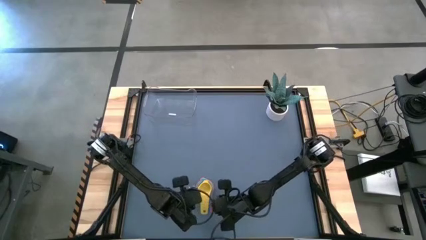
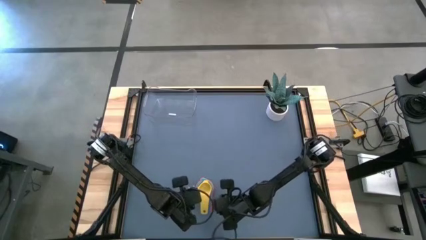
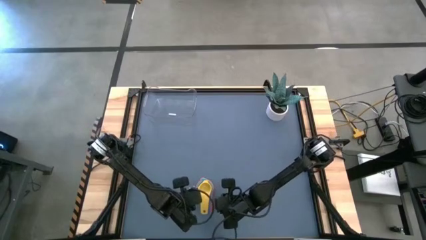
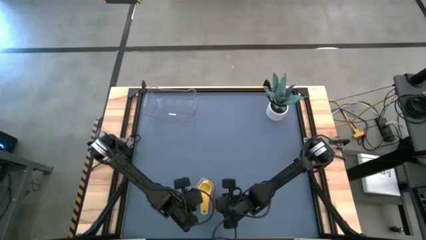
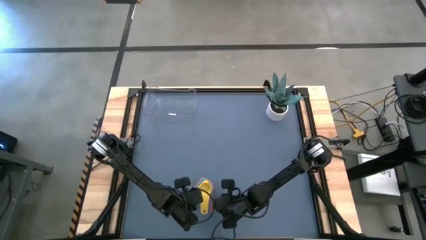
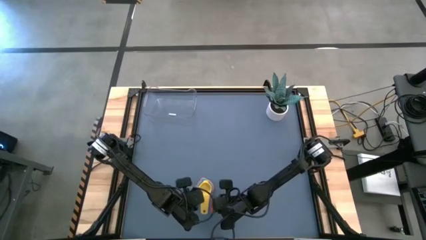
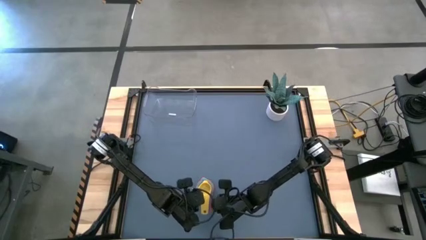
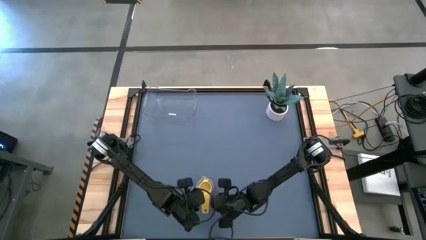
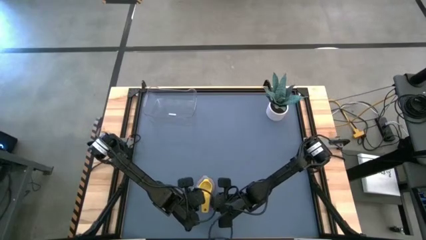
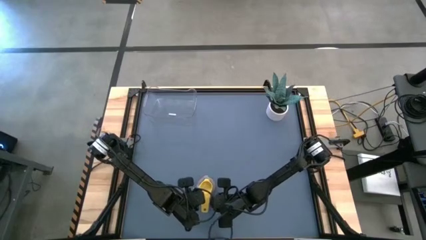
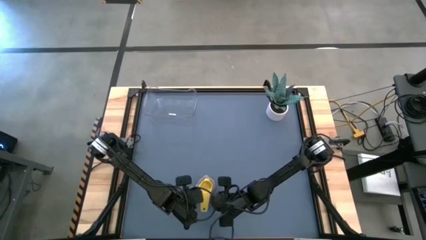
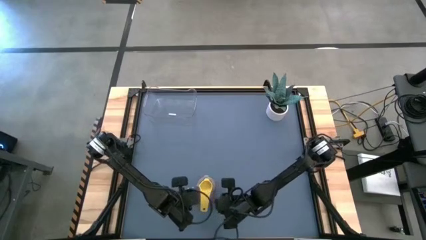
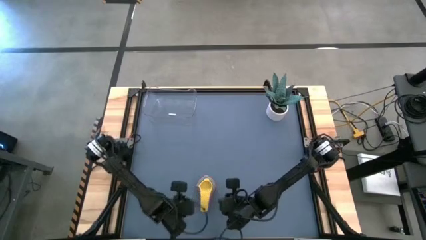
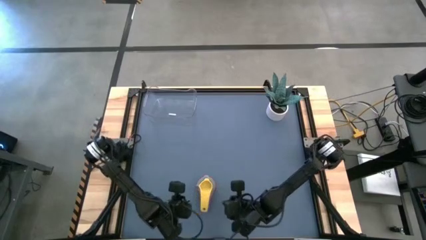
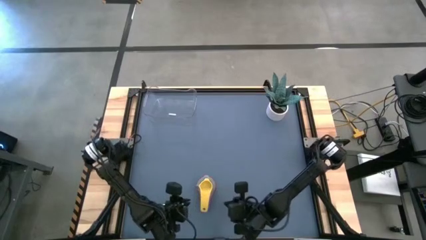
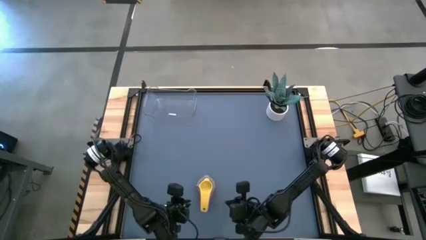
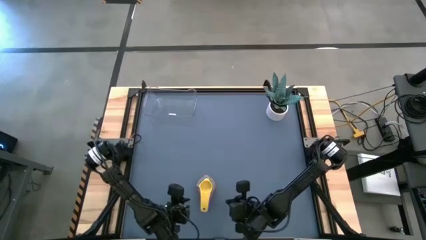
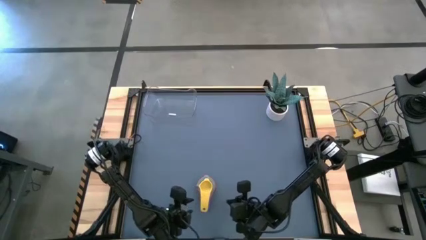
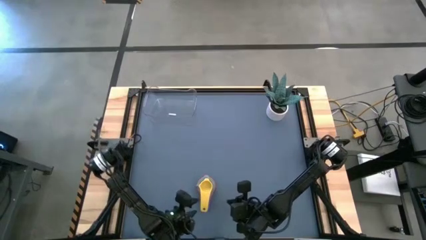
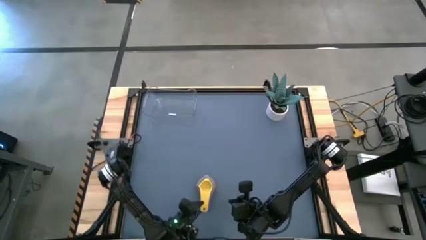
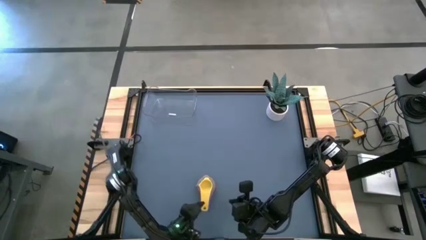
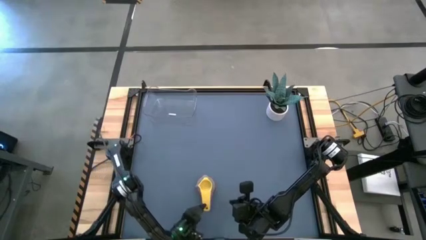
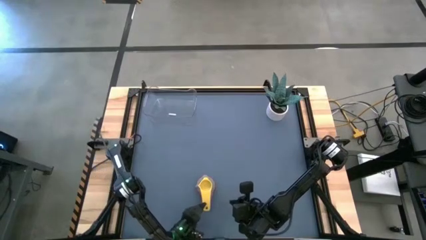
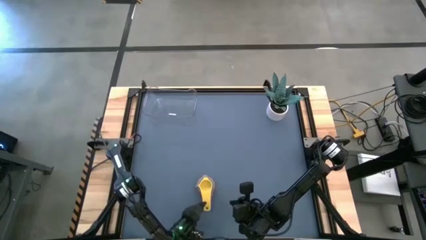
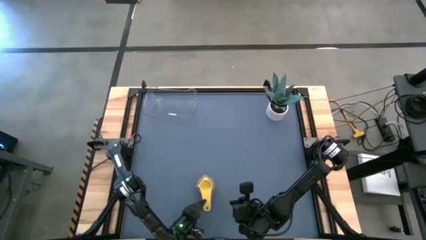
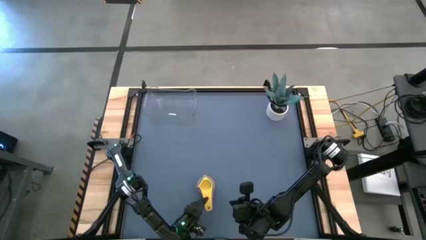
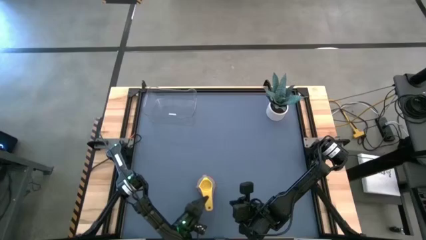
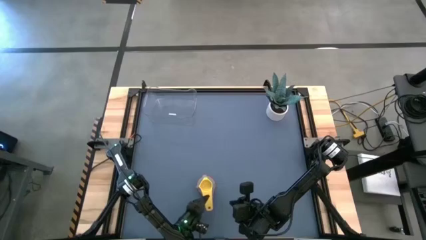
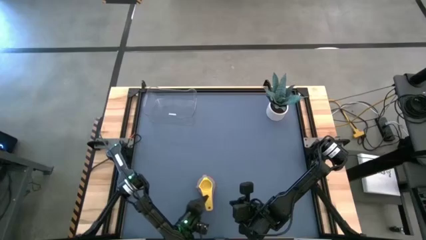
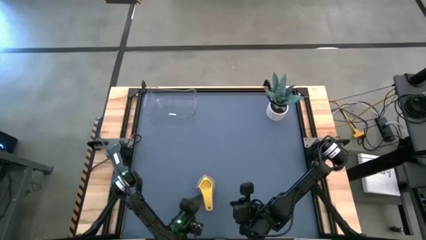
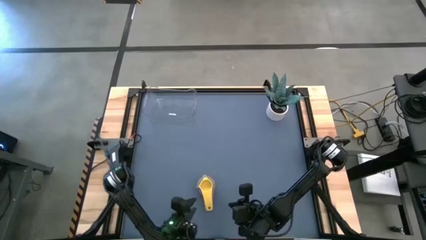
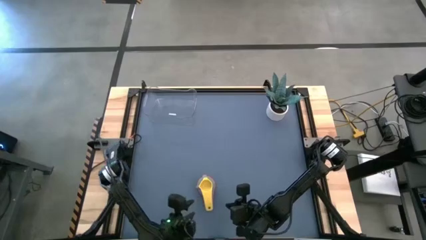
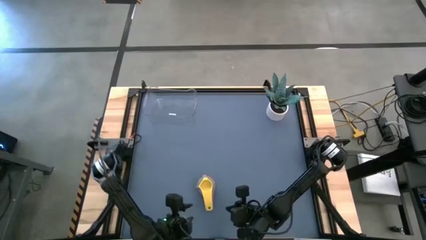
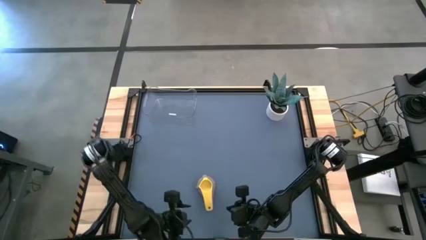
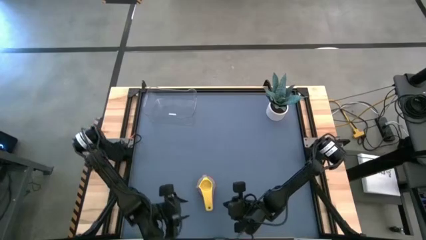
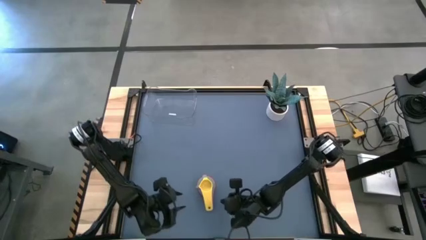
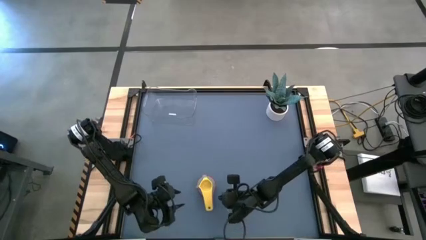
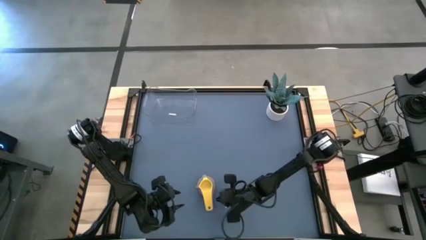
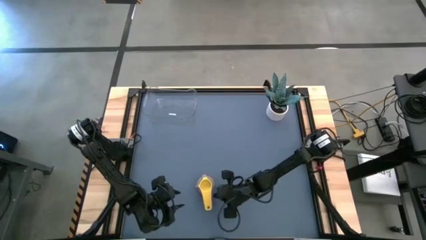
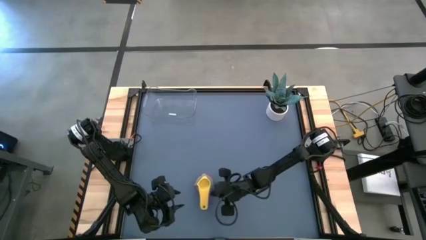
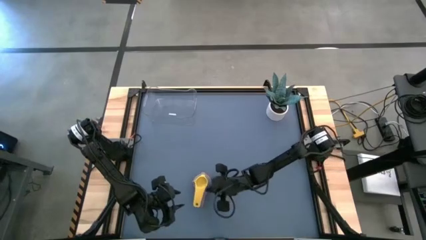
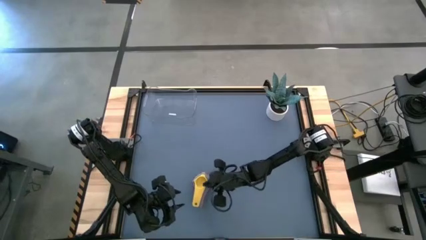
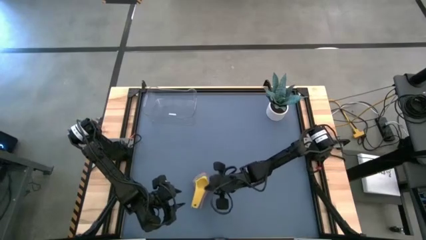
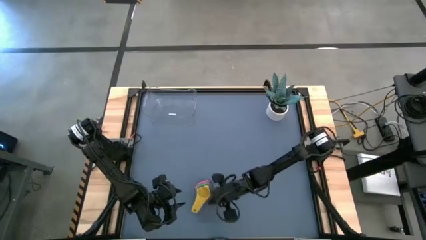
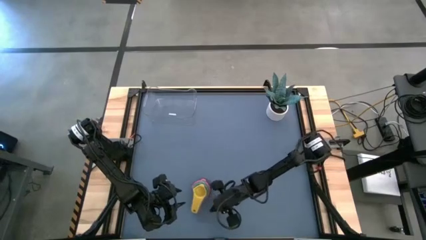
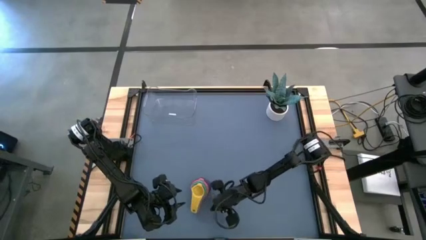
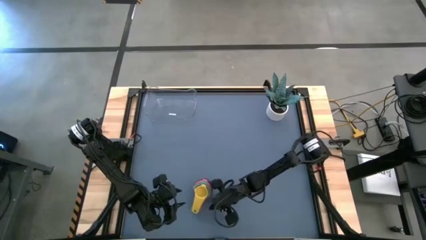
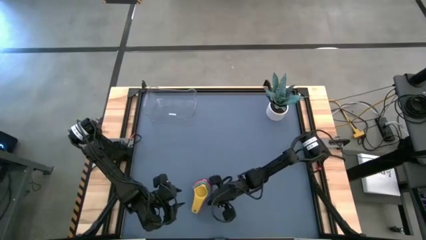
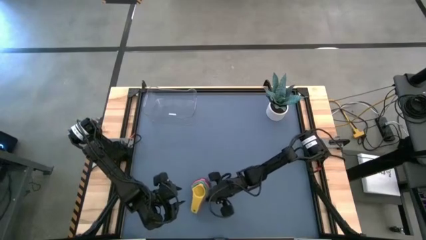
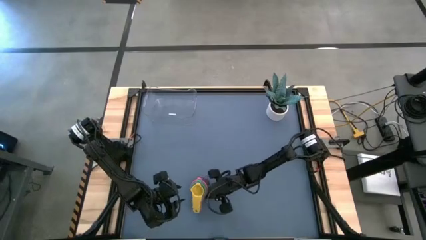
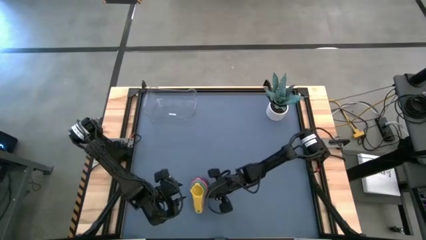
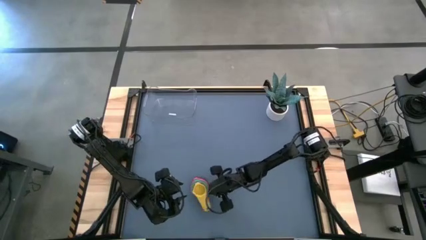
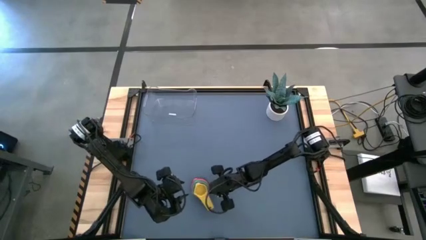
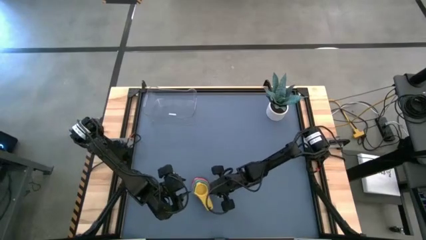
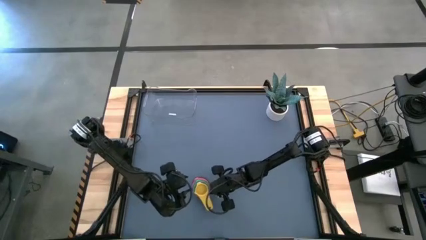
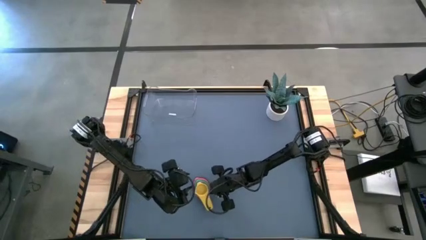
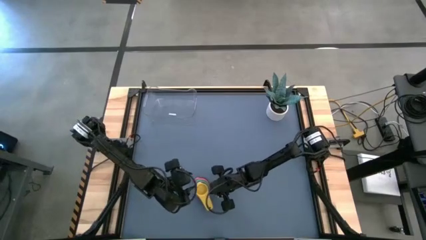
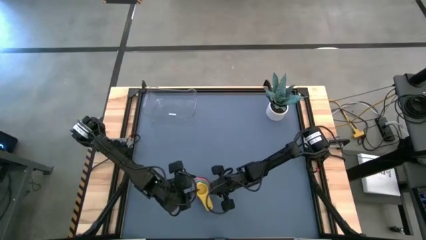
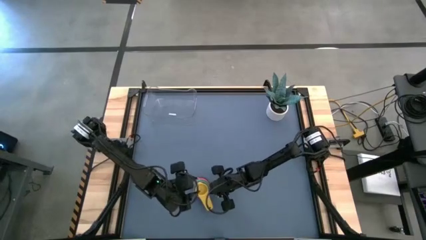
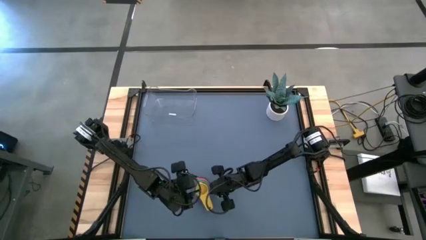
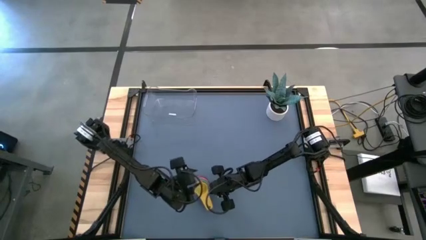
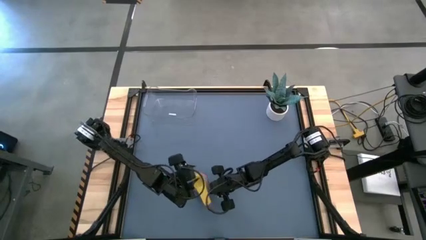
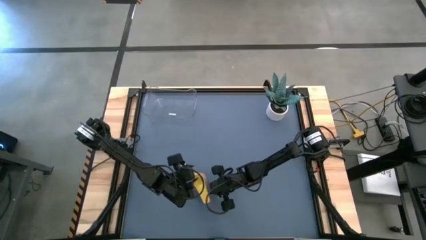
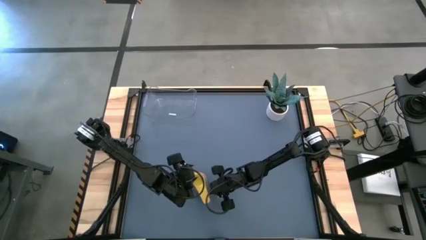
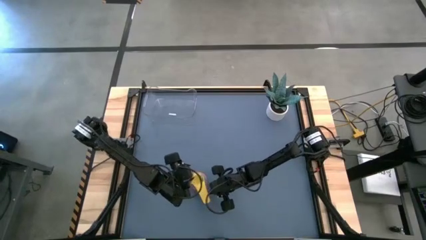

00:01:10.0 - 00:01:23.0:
Task: Nest measuring cups in basket
Put the nest measuring cups into the transparent bin
